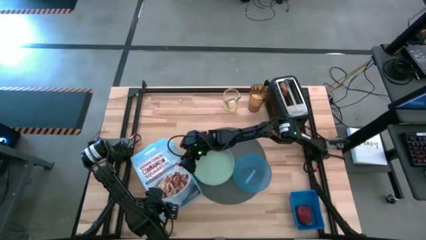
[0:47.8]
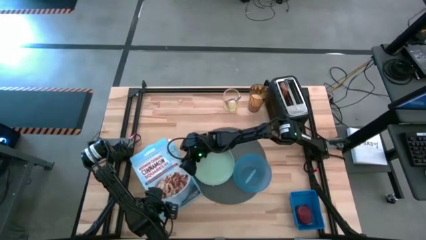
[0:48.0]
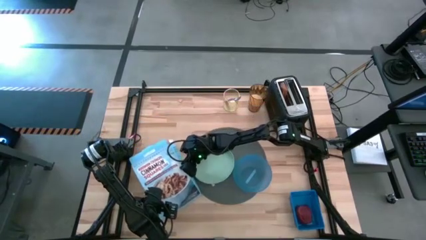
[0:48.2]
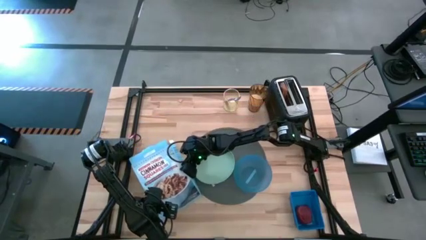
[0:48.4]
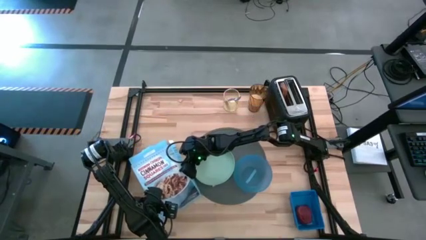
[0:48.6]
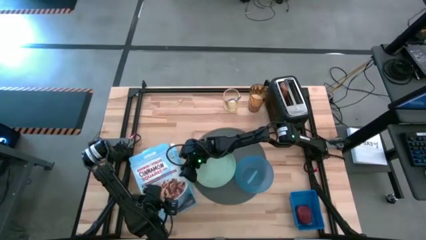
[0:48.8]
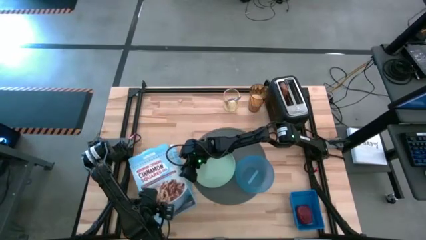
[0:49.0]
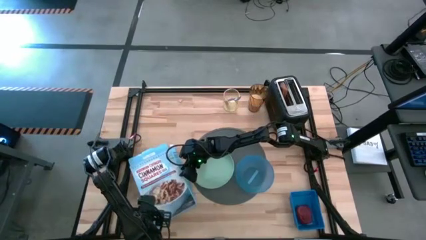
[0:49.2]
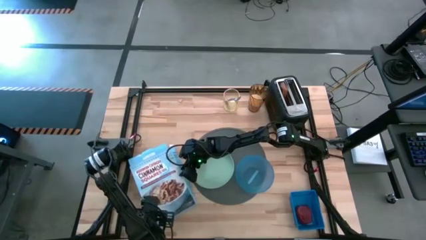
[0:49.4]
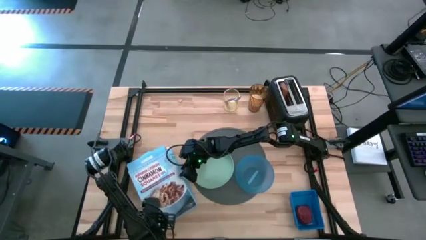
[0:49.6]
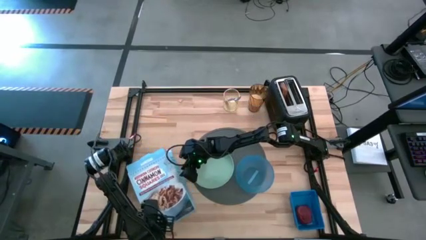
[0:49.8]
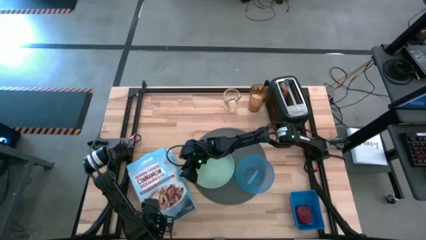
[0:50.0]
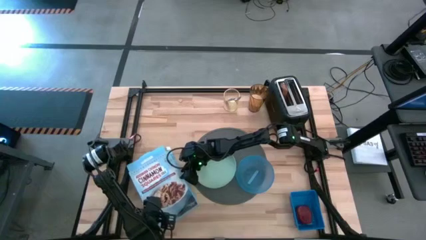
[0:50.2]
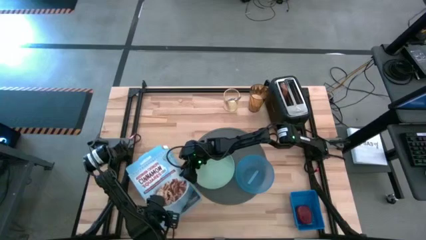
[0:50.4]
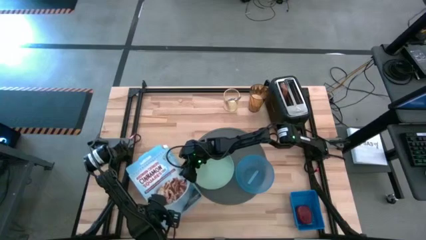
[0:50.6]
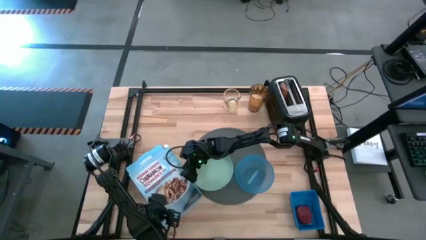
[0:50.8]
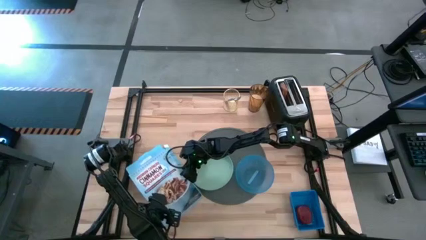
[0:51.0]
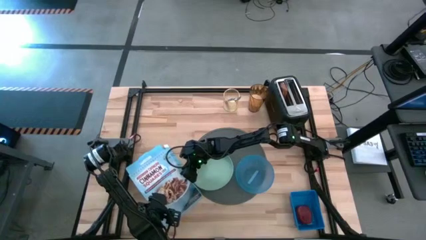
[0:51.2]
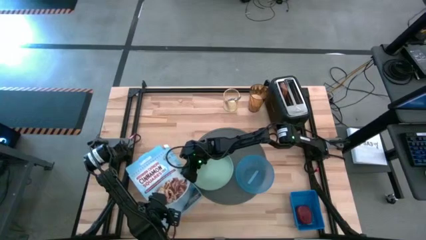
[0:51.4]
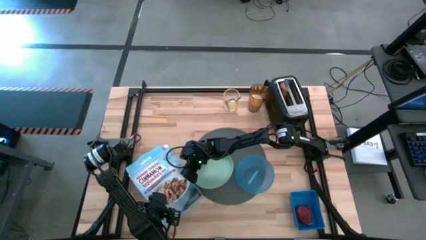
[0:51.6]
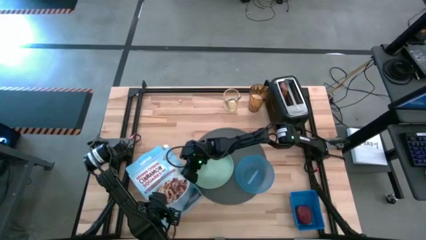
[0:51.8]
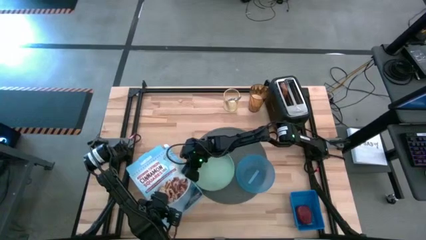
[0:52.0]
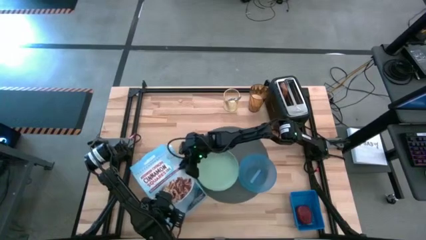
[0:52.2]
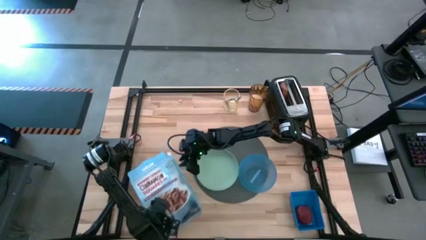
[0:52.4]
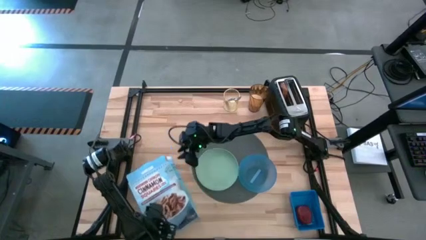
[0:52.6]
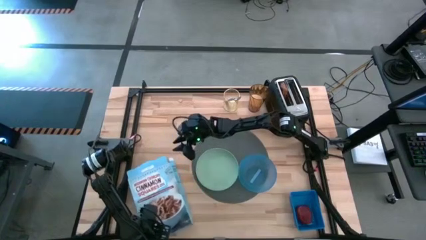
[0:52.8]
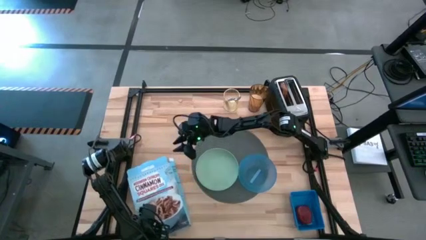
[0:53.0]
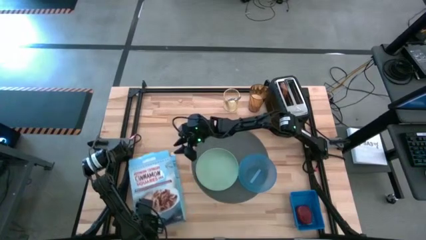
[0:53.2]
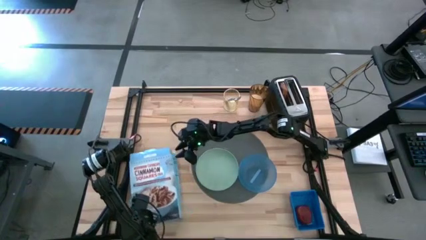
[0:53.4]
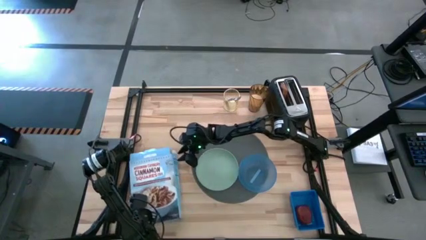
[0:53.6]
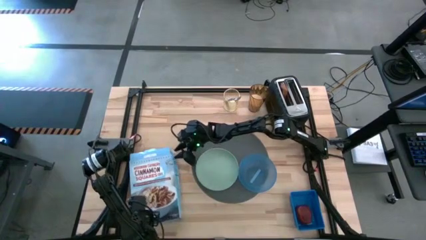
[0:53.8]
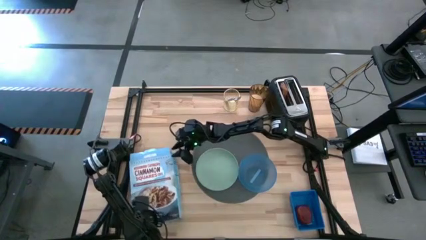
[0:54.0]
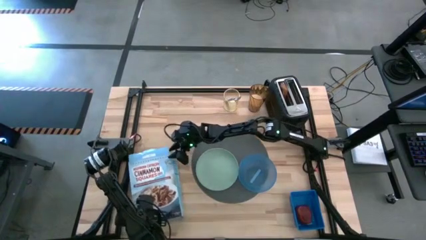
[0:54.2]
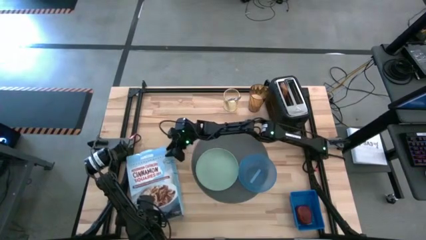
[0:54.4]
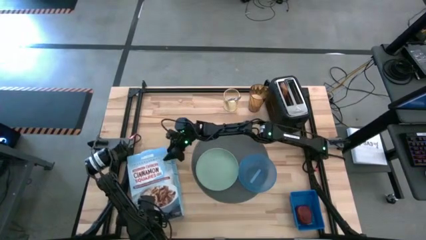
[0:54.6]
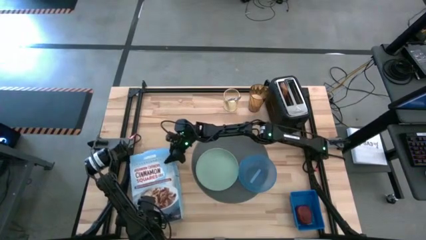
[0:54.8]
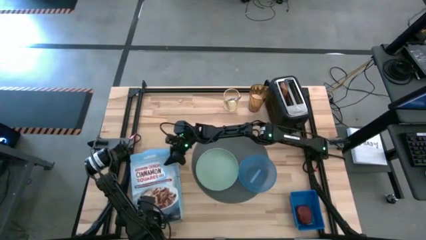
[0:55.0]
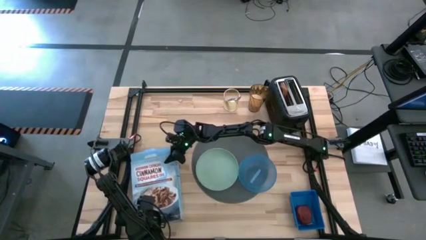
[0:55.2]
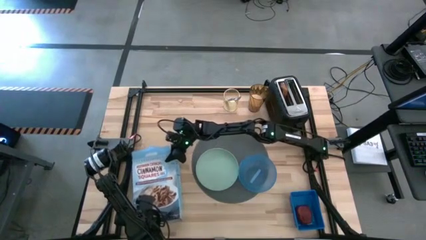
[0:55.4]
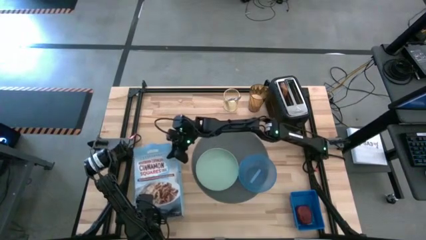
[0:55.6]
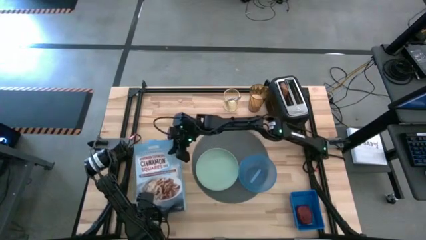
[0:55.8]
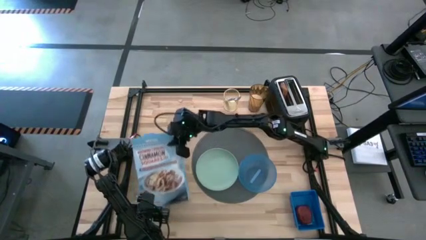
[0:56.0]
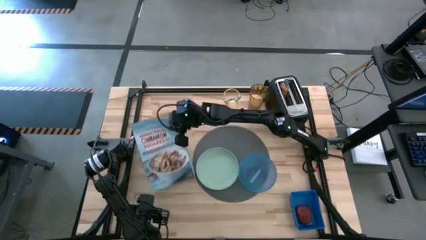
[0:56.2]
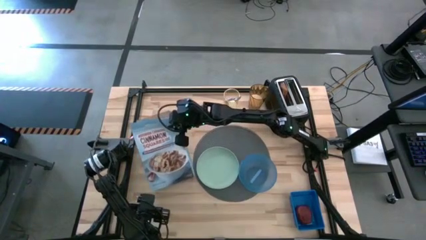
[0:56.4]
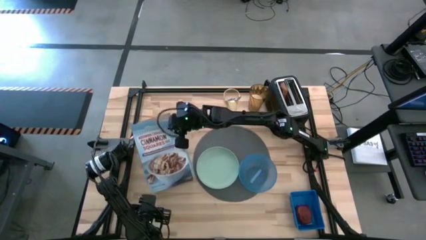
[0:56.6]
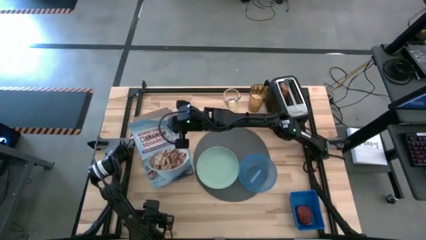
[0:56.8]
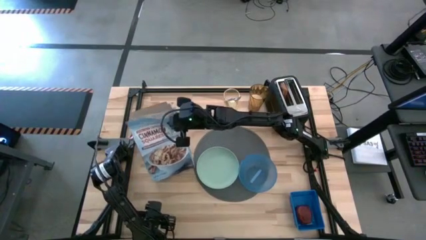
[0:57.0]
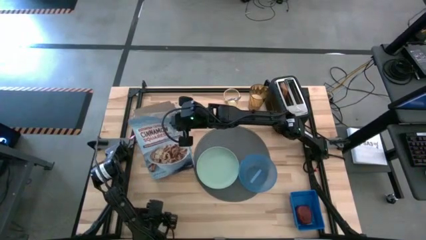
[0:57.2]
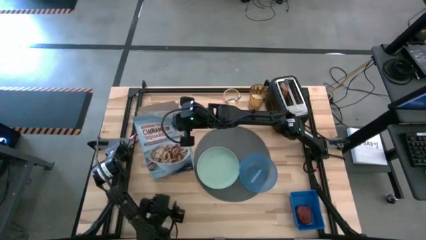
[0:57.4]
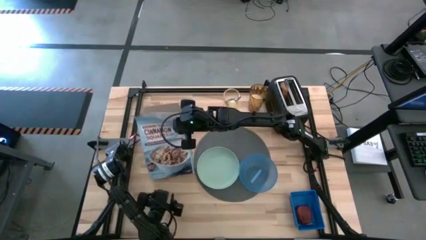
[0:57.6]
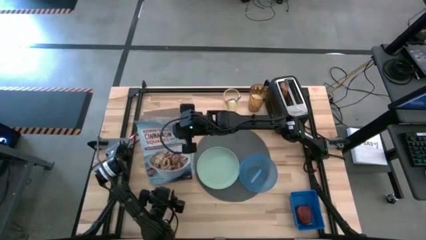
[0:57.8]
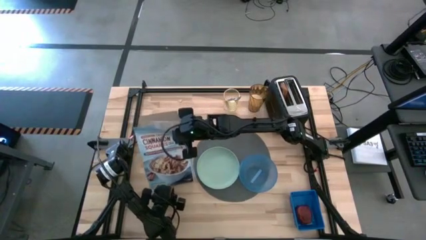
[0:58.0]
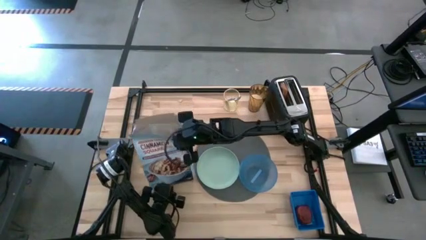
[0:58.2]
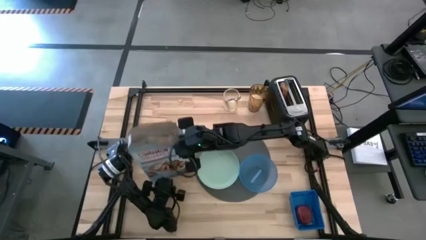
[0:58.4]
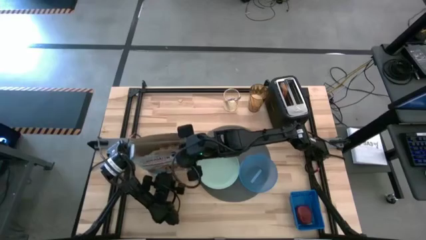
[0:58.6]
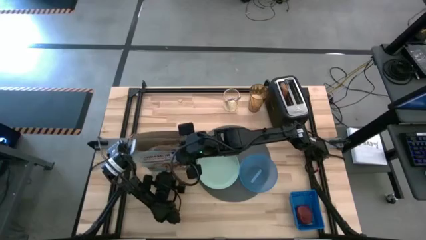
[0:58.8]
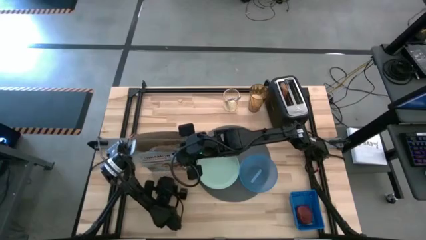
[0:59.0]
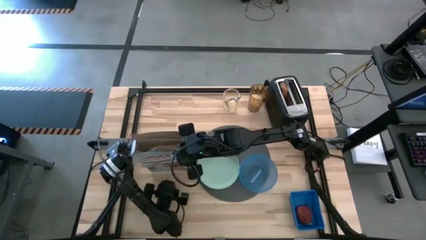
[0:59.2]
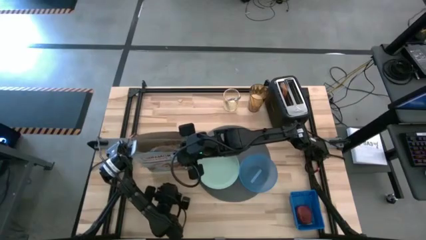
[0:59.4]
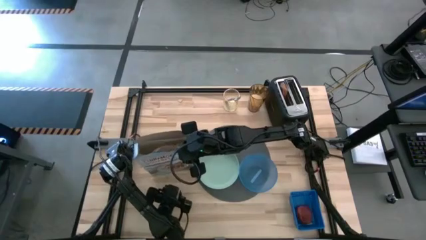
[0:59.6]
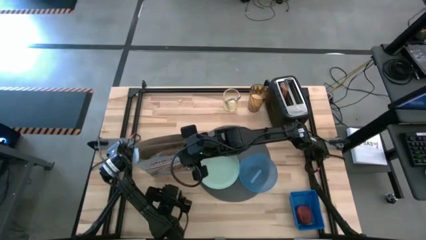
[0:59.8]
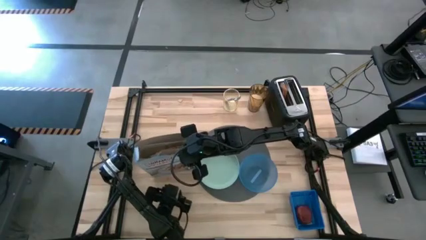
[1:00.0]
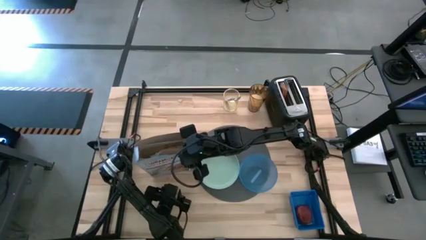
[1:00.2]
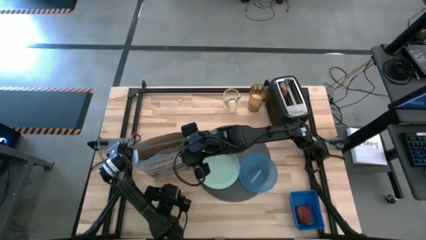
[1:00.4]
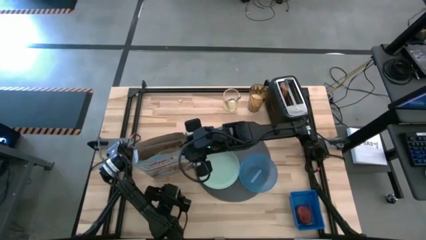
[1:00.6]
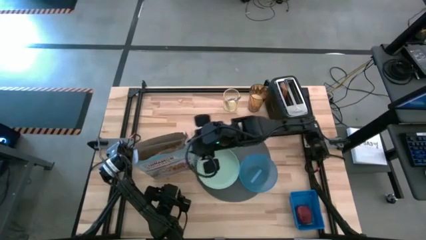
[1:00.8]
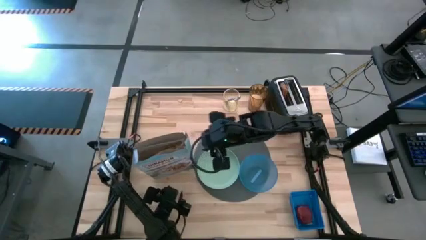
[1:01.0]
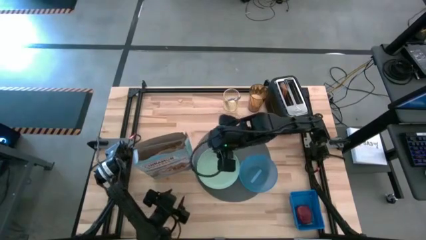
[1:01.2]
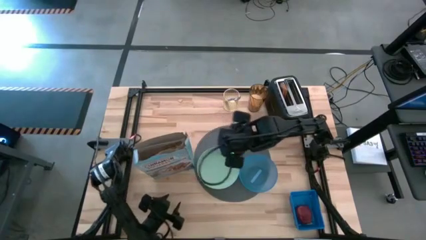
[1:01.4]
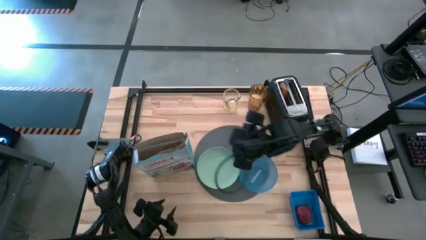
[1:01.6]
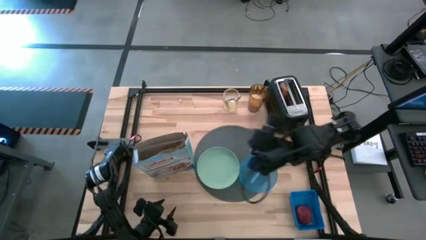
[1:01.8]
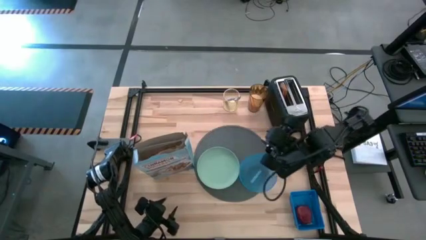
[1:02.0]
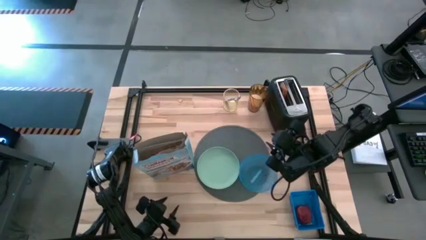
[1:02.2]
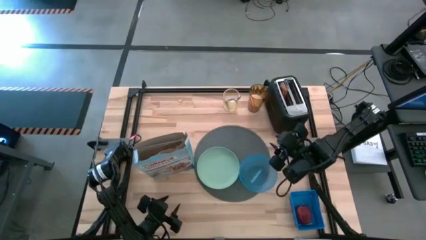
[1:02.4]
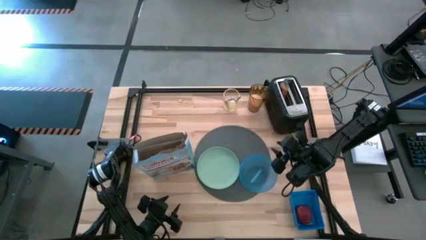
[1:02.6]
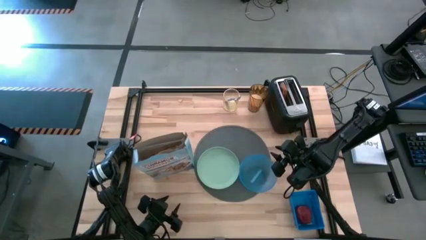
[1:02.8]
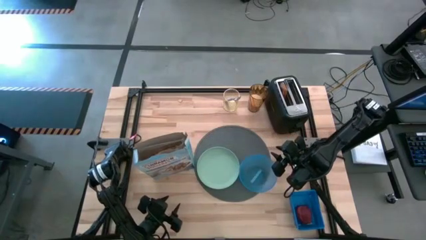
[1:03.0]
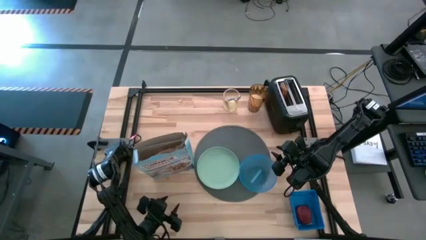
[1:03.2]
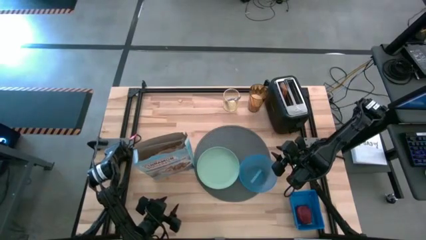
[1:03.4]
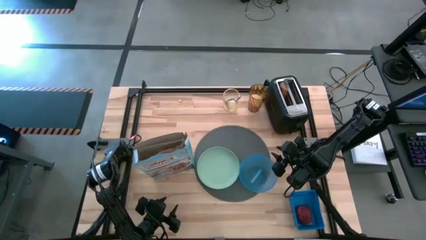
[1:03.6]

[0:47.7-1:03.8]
Task: Arrange a breakfast setting
Pour the cereal from the cereal box into the blue bowl
